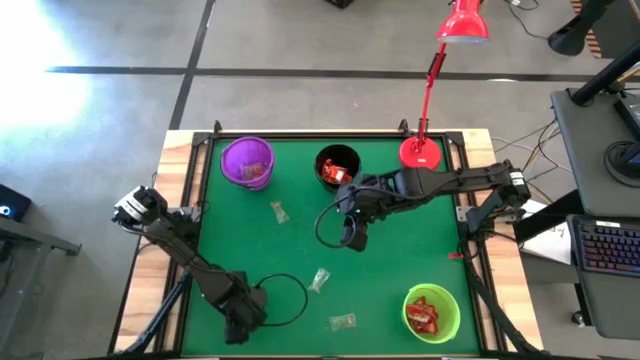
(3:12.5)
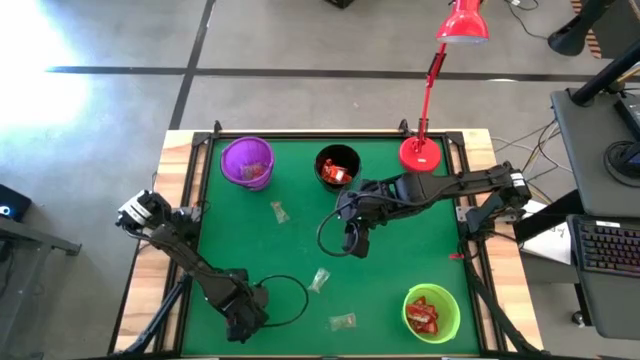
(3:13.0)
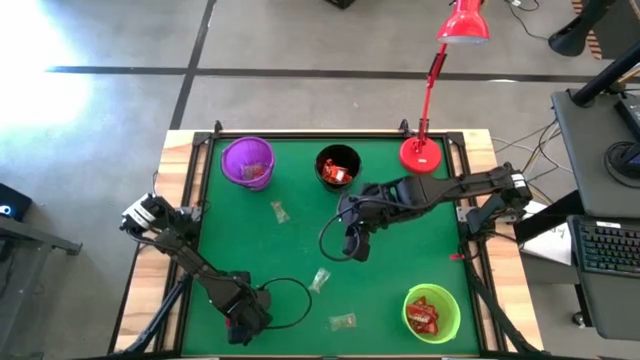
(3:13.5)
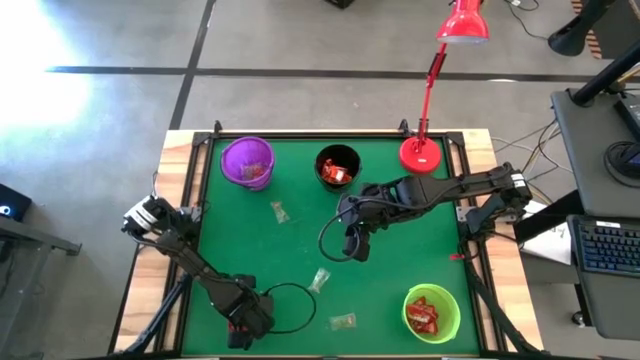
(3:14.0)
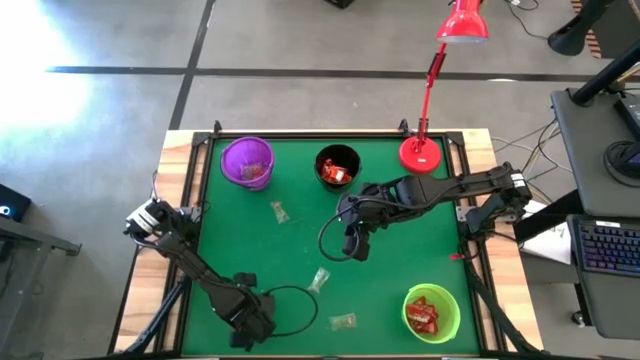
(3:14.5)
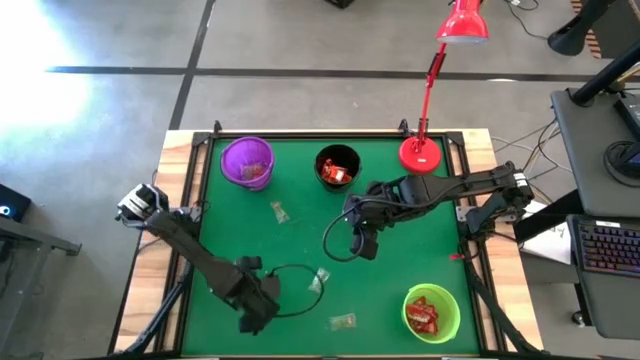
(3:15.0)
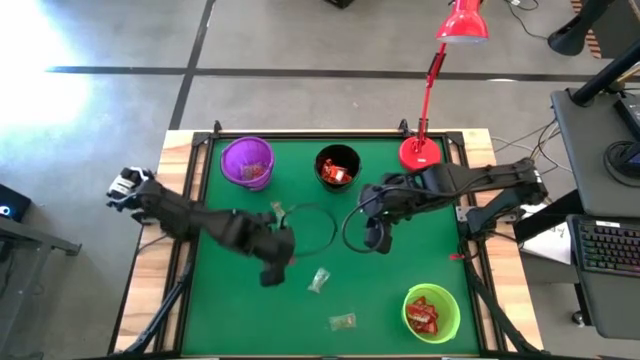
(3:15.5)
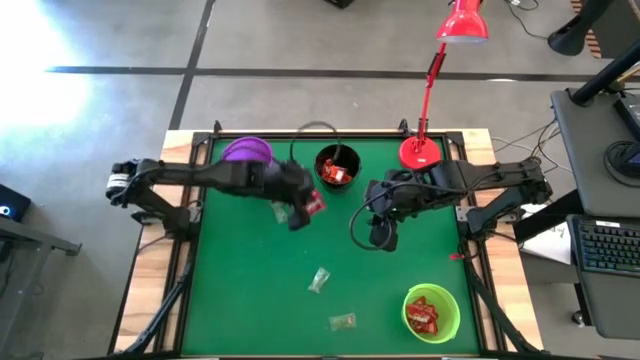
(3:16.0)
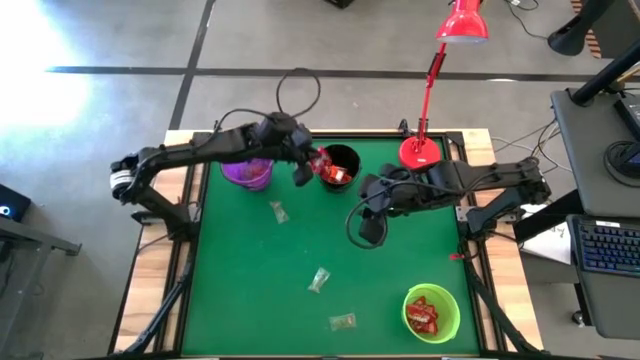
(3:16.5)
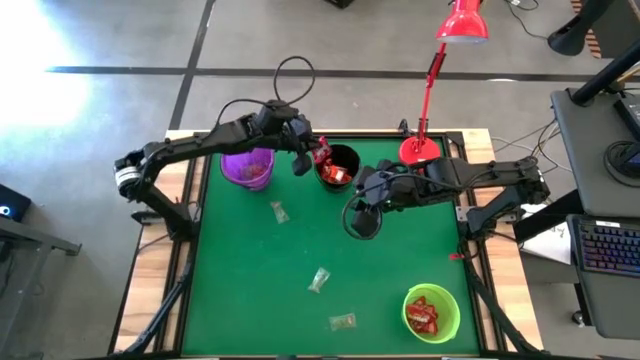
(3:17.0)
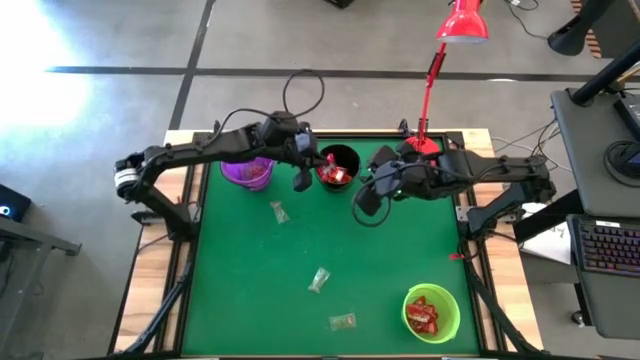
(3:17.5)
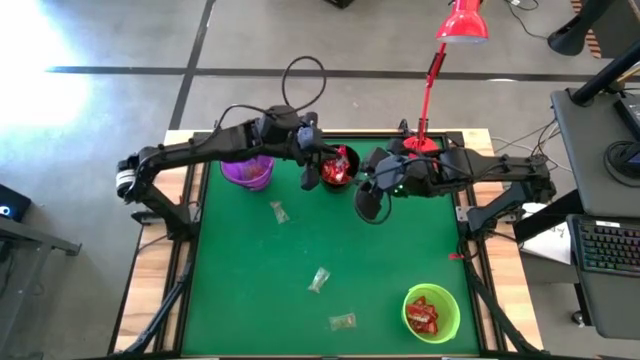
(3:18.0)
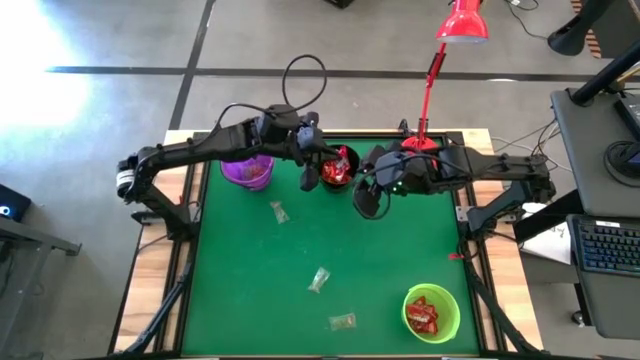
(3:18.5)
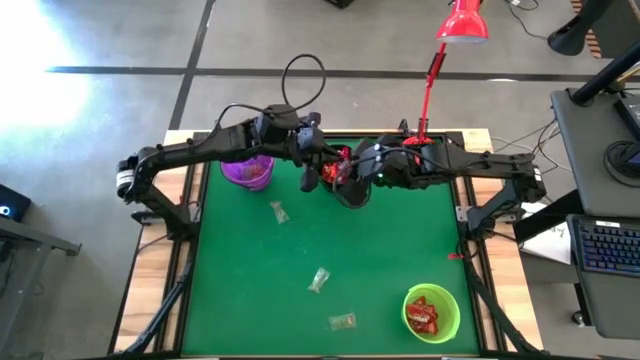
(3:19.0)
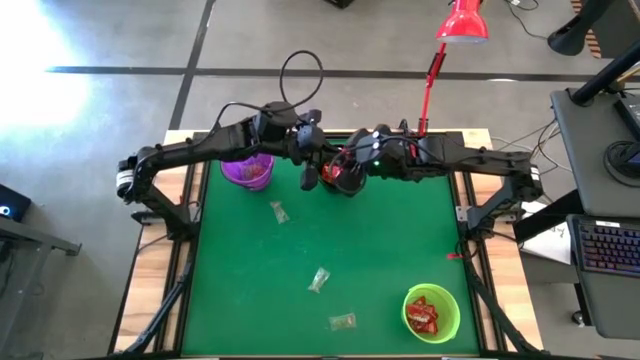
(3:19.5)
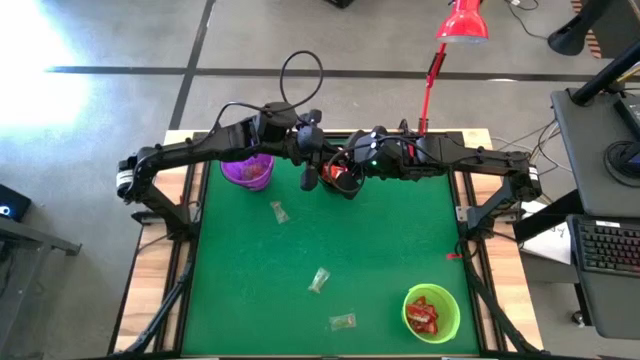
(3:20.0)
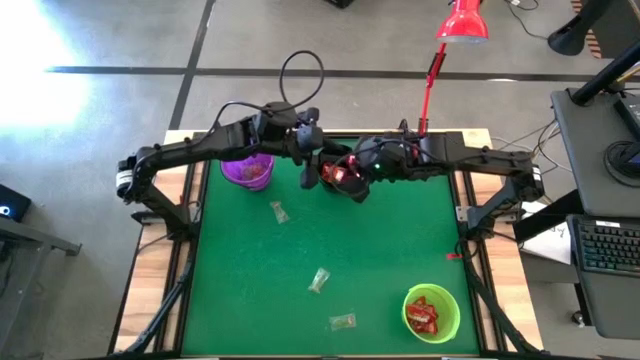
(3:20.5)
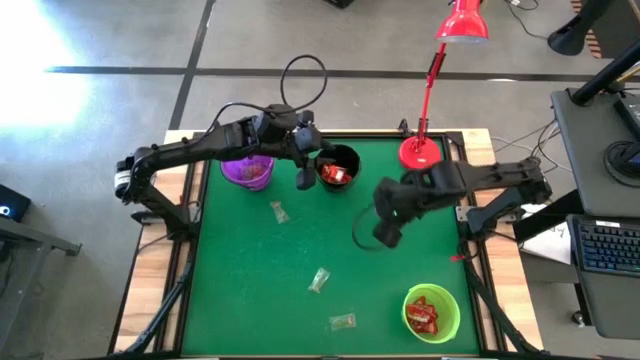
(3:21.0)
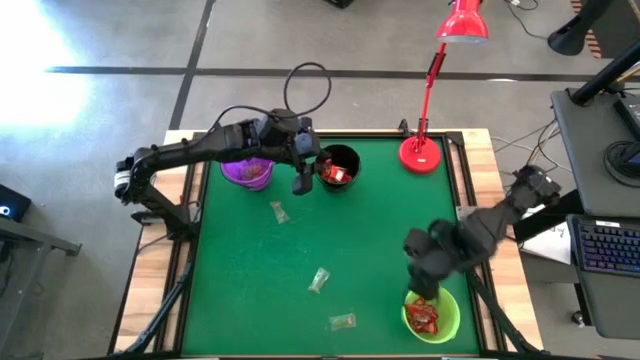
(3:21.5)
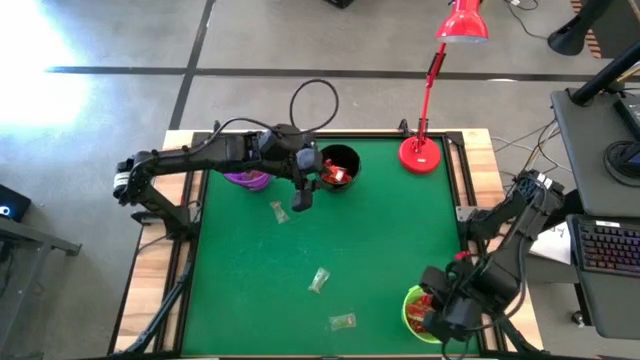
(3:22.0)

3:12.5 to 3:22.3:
Task: Sort candy
Put the red candy into the green bucket

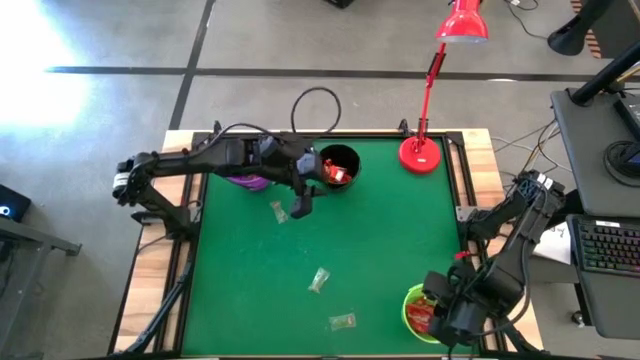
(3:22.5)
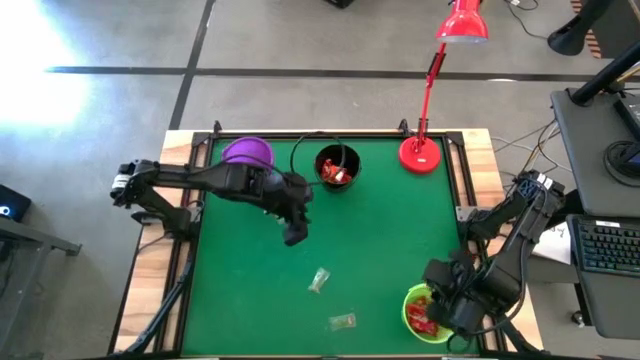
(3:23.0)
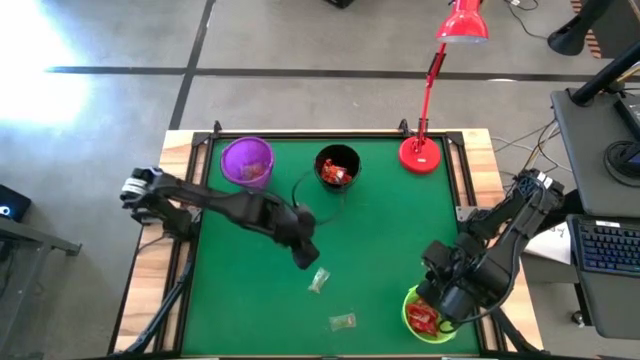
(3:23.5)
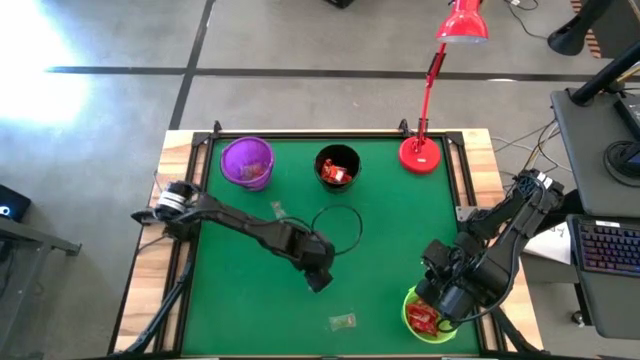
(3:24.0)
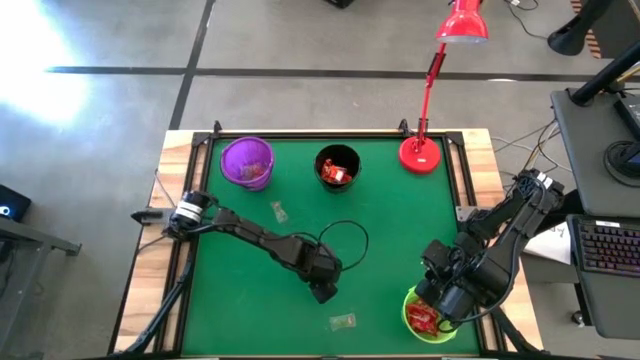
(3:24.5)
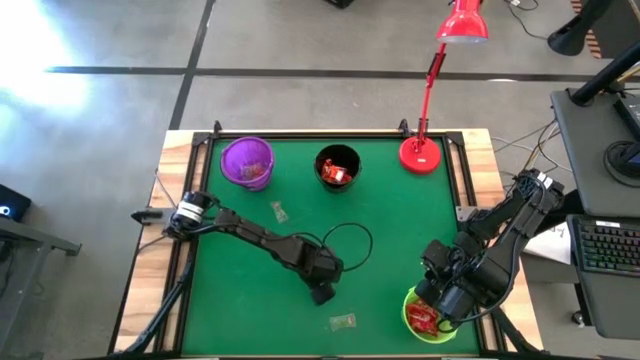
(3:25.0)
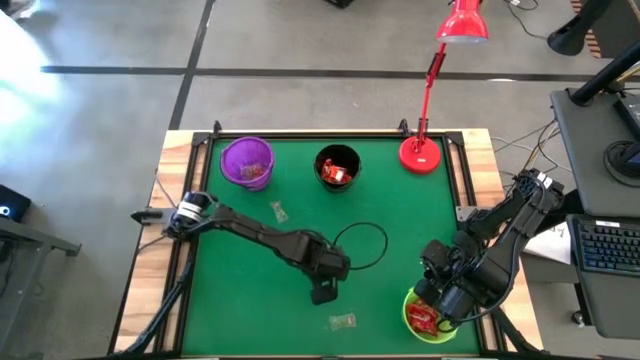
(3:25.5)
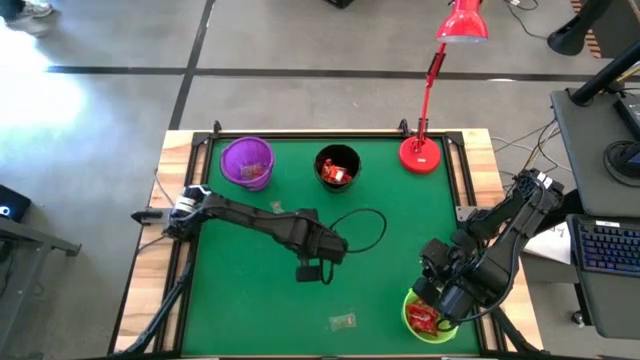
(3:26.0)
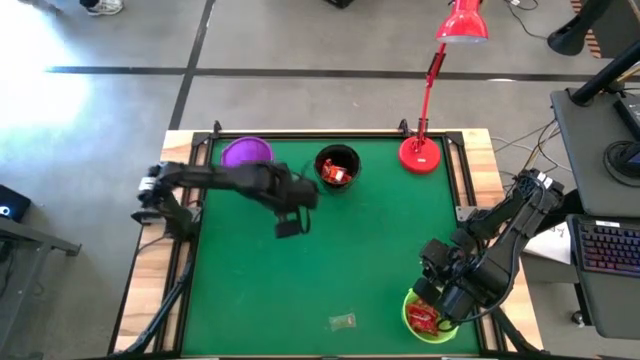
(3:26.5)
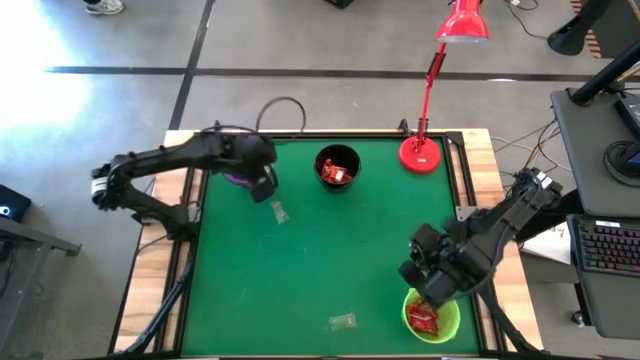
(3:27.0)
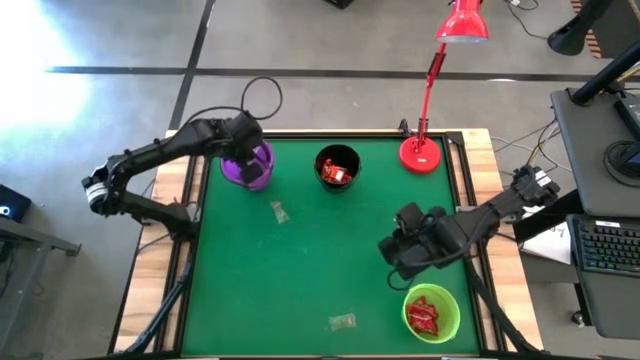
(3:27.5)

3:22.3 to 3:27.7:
Put the green gummy into the violet bucket

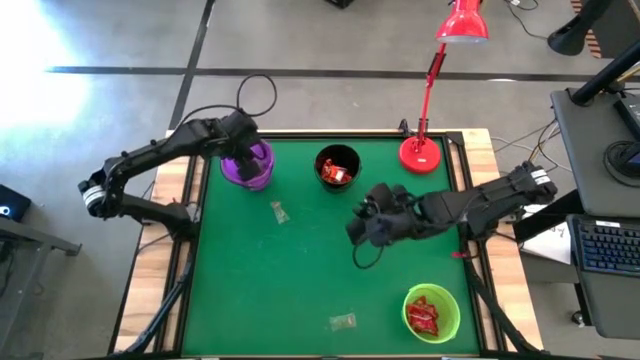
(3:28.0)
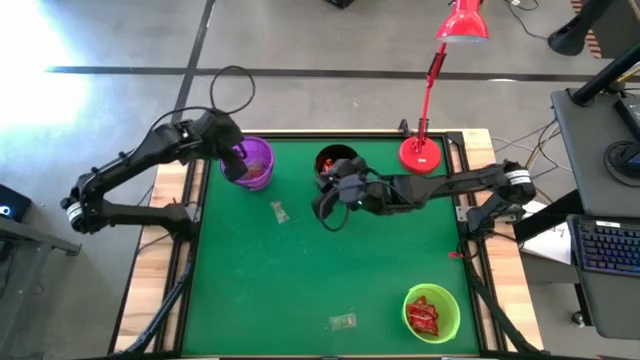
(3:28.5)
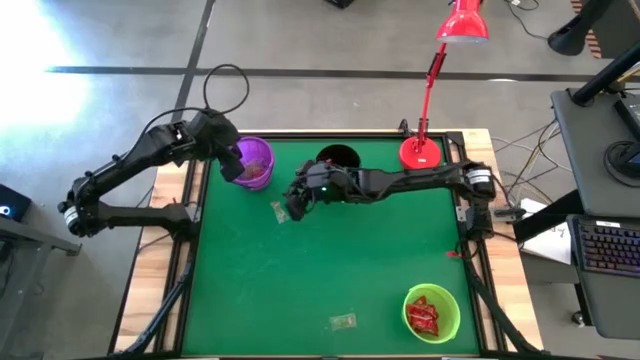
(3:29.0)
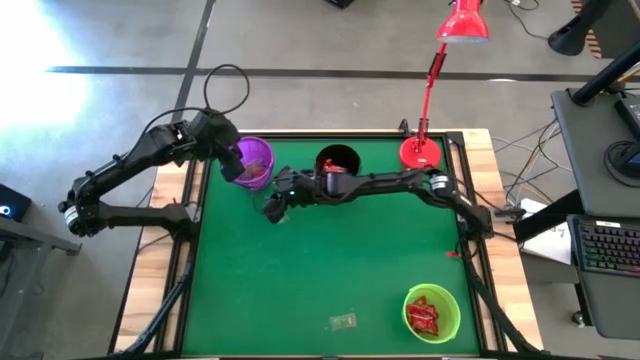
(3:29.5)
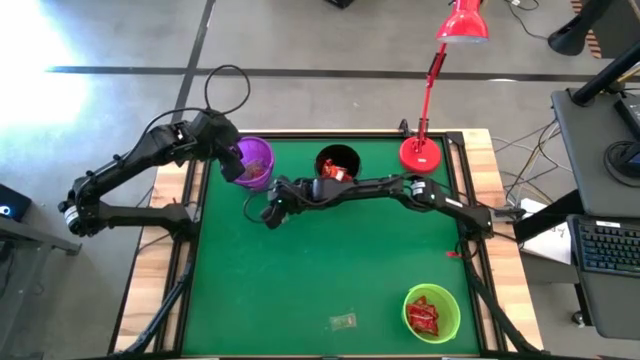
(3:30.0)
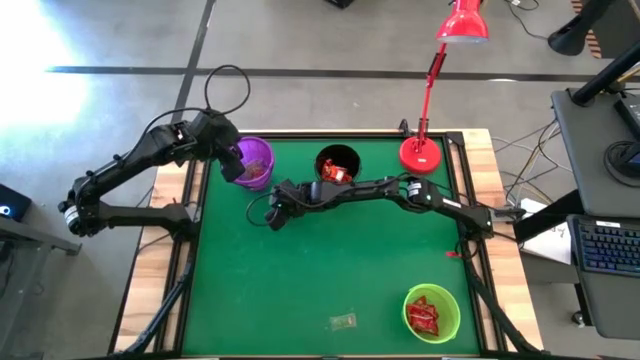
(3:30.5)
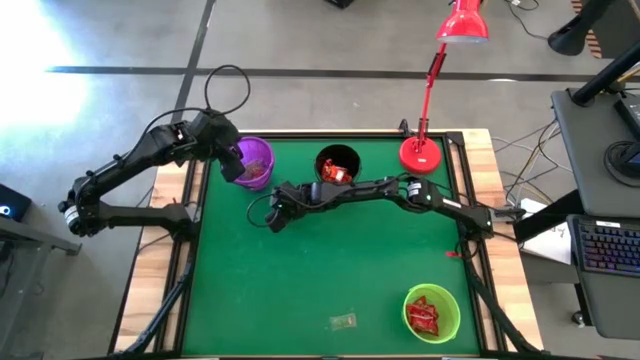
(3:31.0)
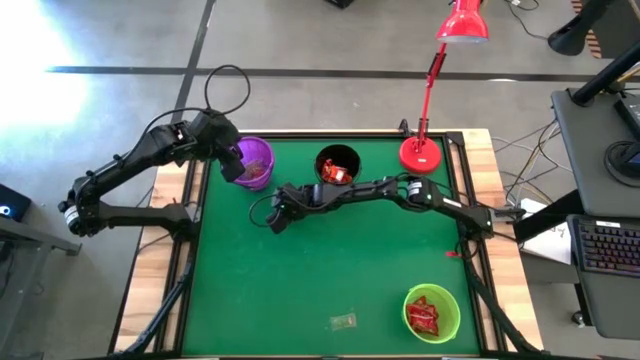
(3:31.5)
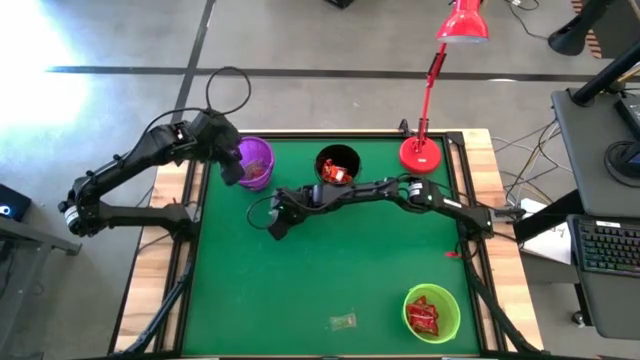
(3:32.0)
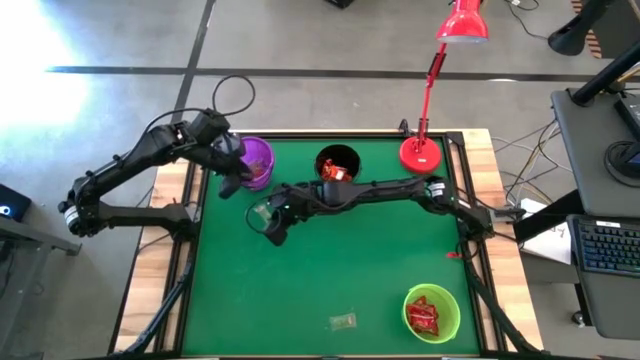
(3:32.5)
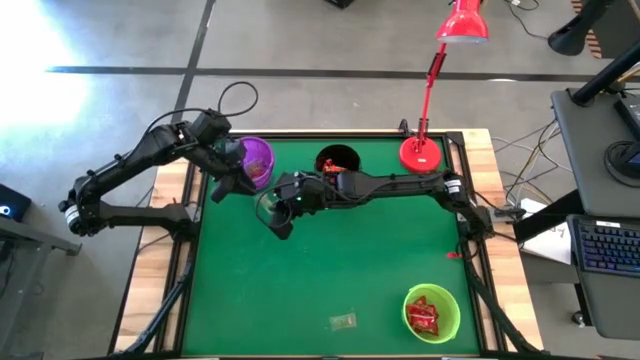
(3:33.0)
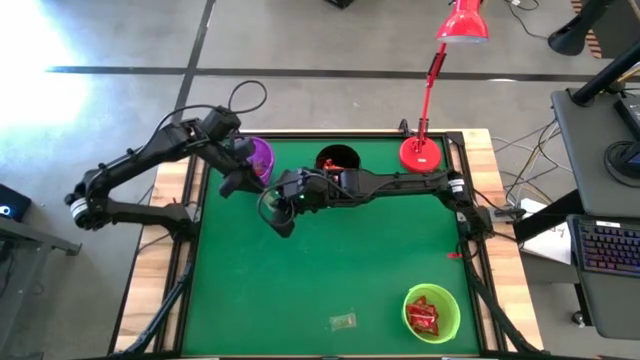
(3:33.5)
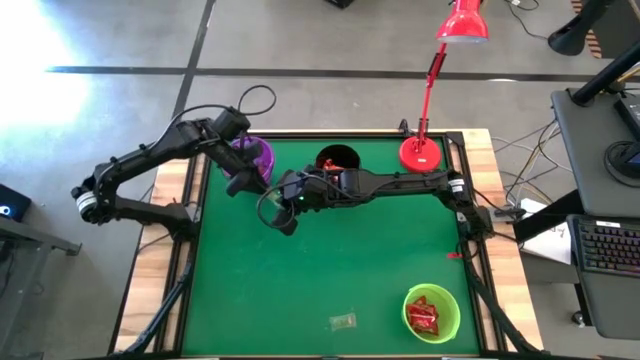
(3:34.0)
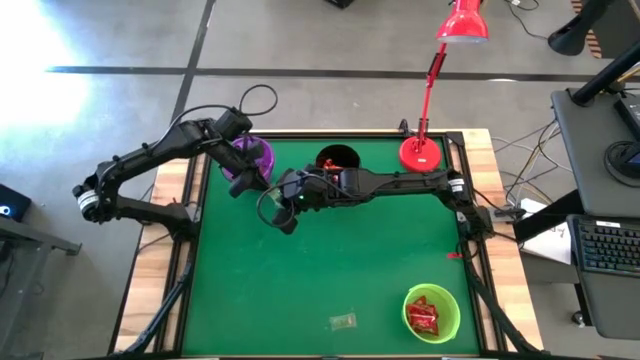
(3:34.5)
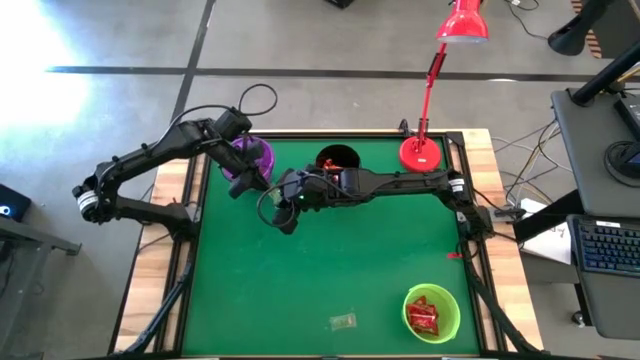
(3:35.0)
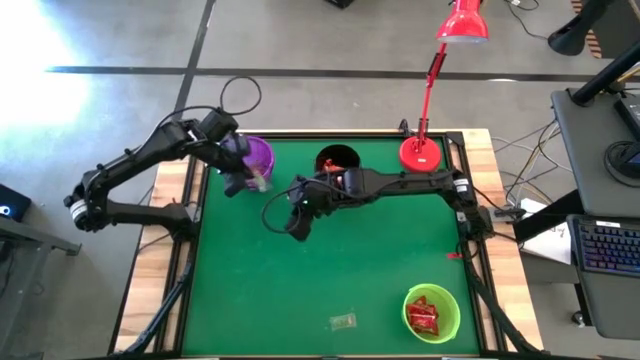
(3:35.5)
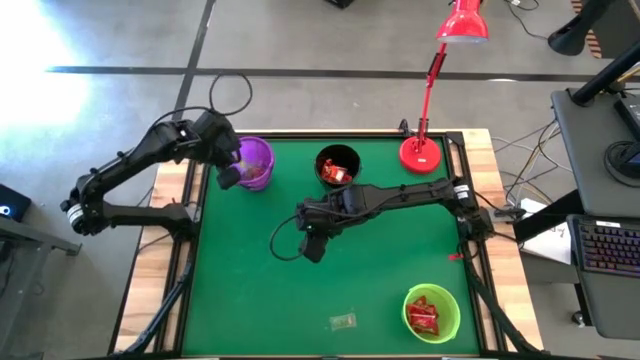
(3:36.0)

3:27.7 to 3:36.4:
Put the green gummy into the violet bucket
